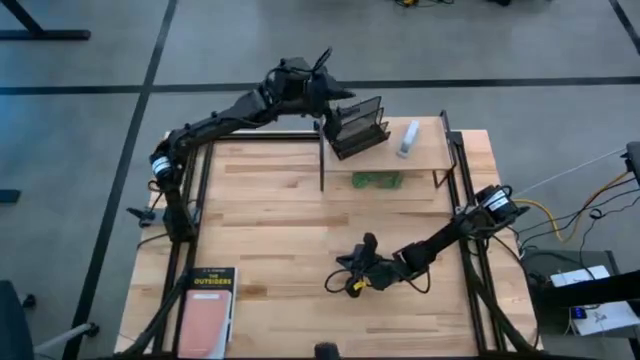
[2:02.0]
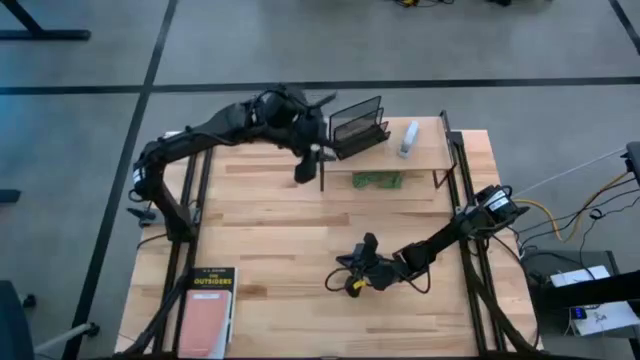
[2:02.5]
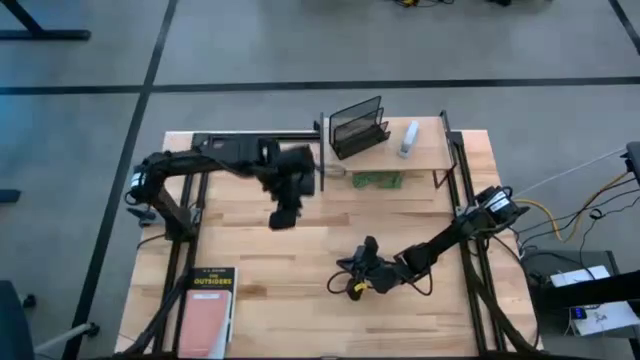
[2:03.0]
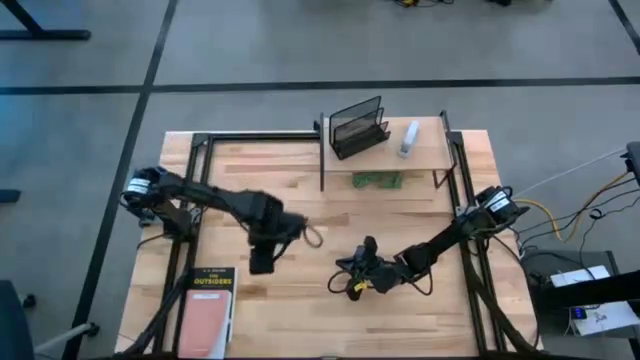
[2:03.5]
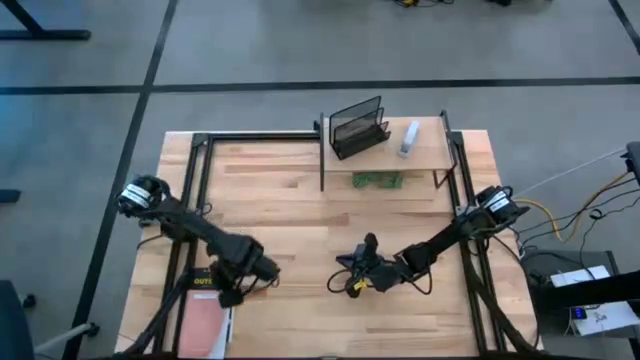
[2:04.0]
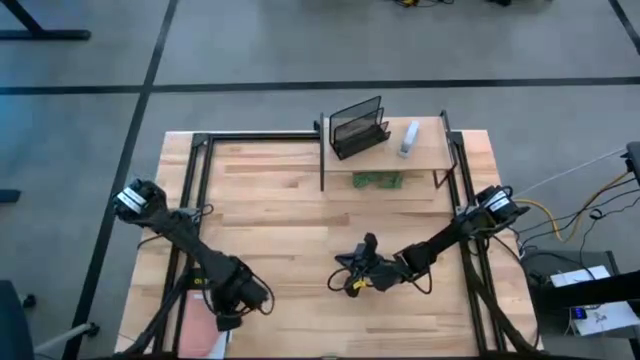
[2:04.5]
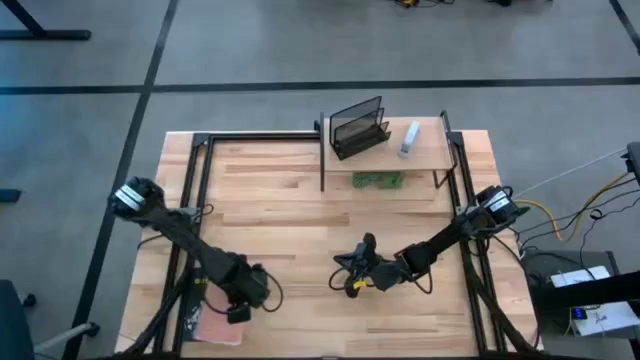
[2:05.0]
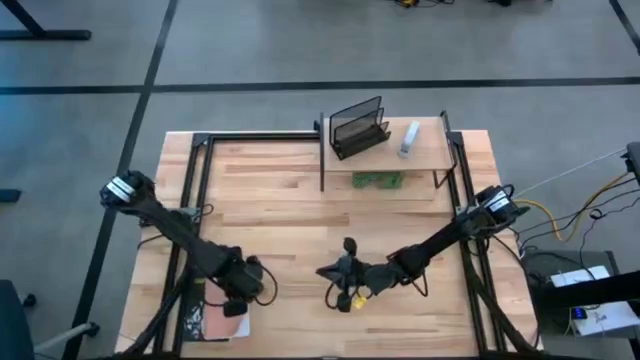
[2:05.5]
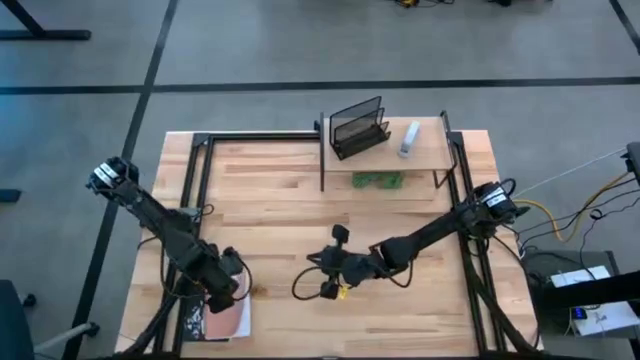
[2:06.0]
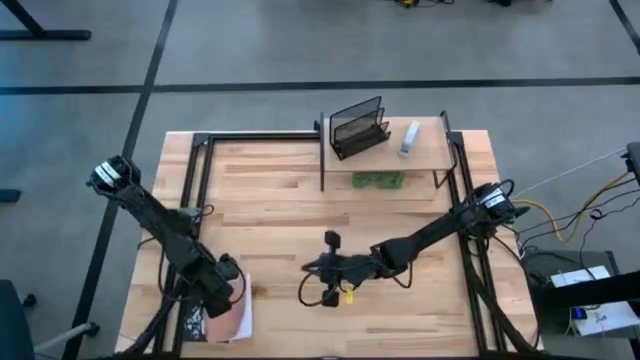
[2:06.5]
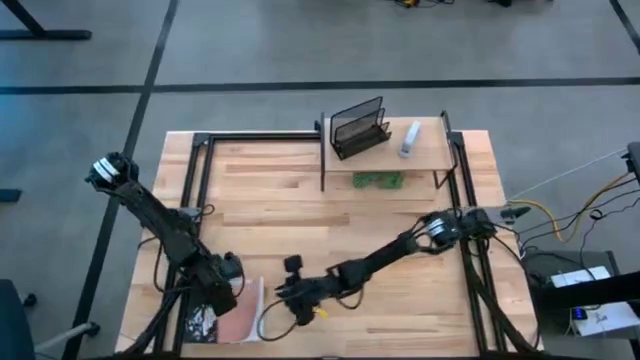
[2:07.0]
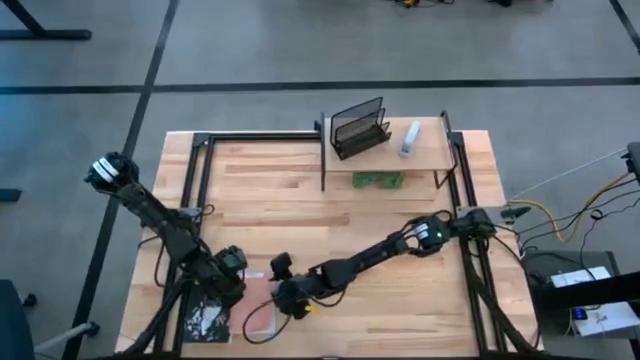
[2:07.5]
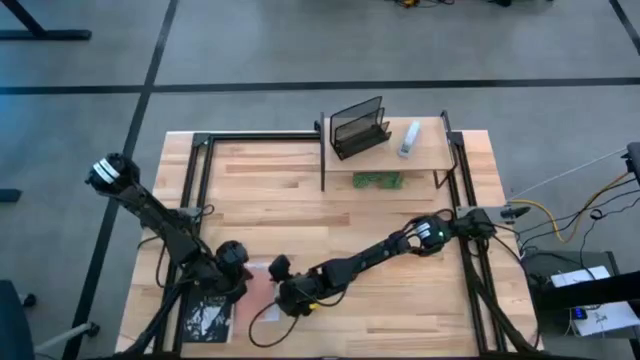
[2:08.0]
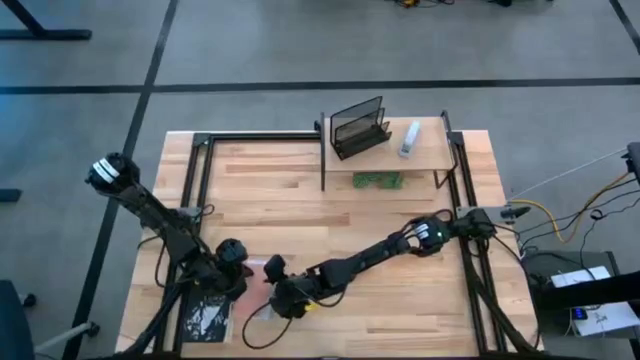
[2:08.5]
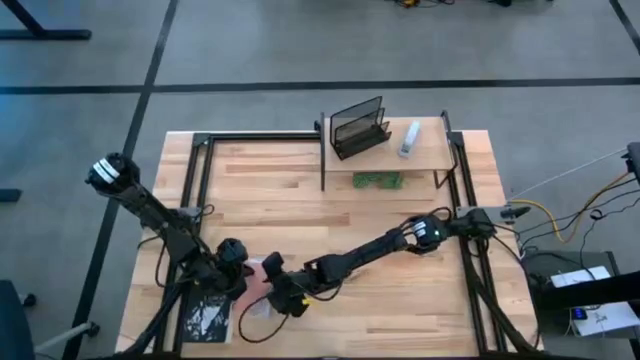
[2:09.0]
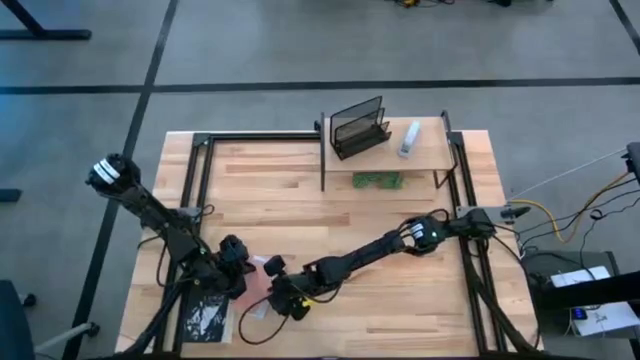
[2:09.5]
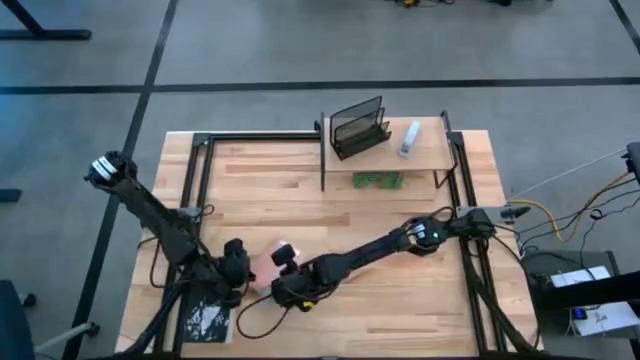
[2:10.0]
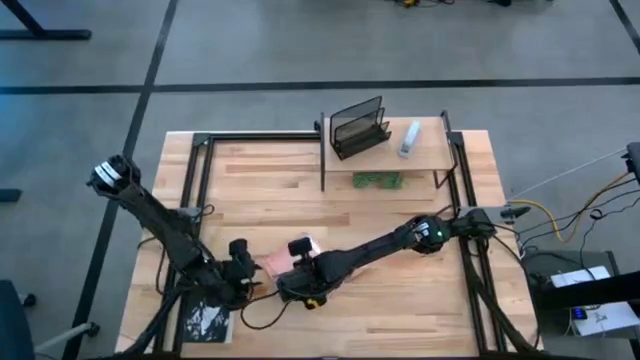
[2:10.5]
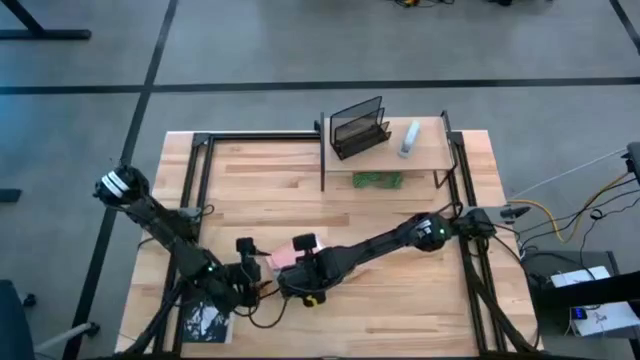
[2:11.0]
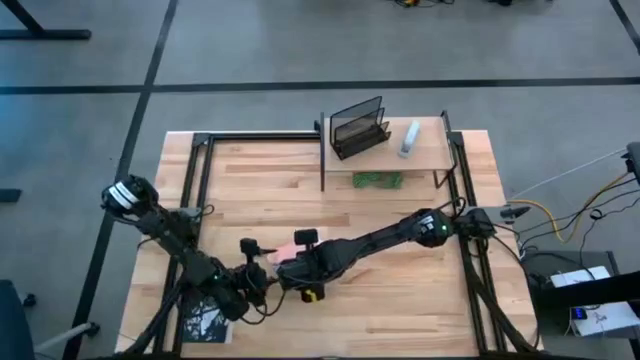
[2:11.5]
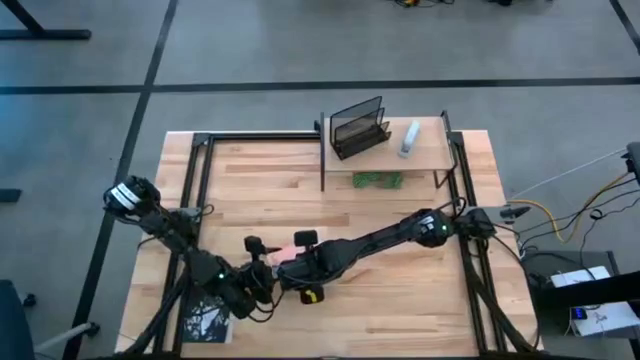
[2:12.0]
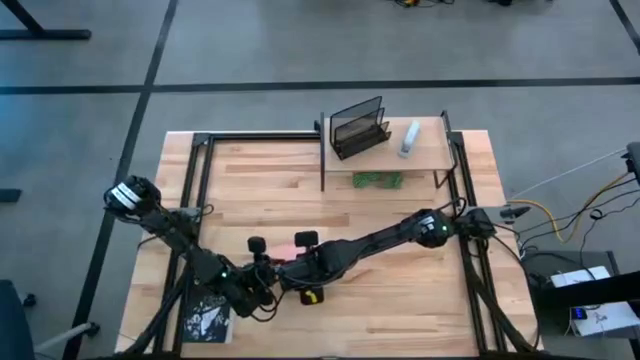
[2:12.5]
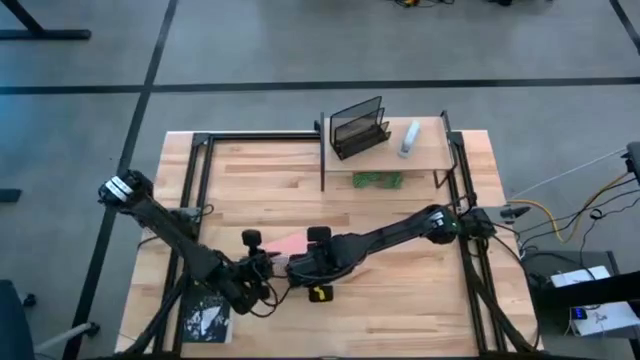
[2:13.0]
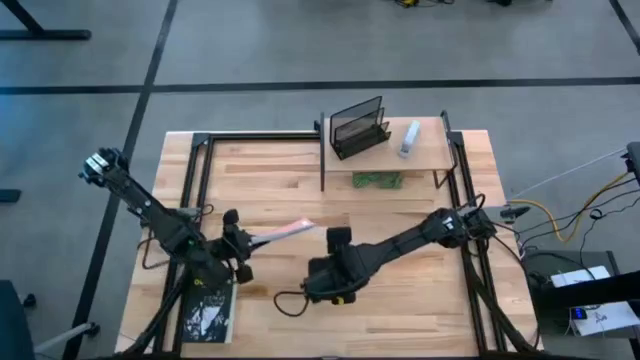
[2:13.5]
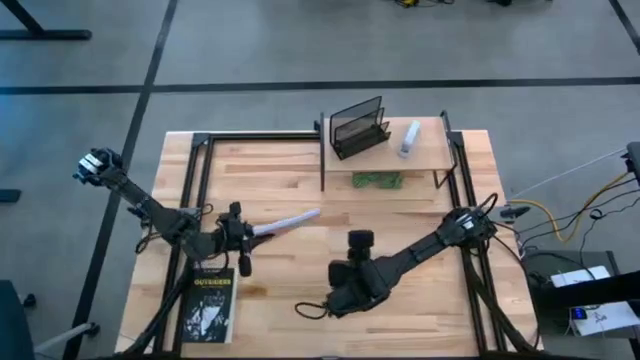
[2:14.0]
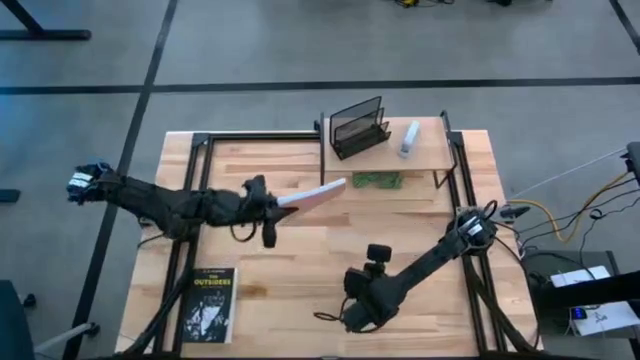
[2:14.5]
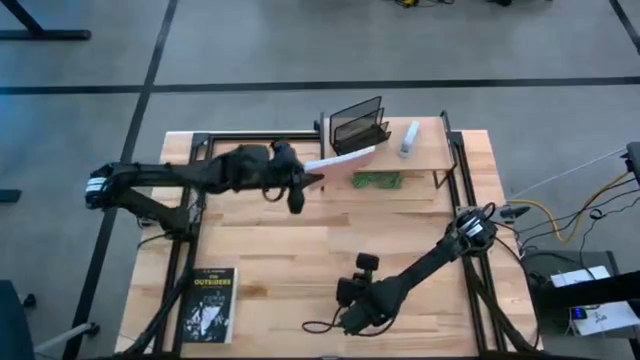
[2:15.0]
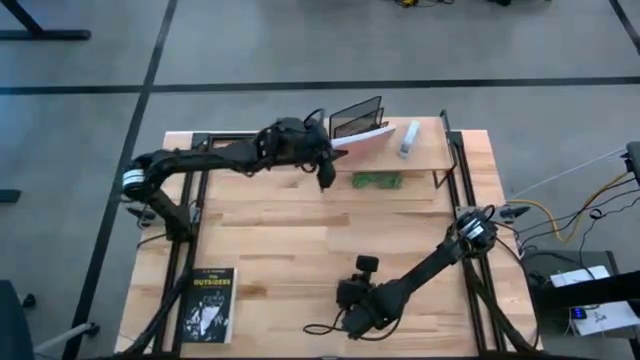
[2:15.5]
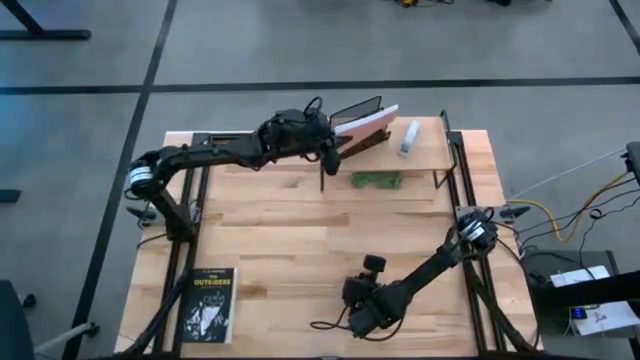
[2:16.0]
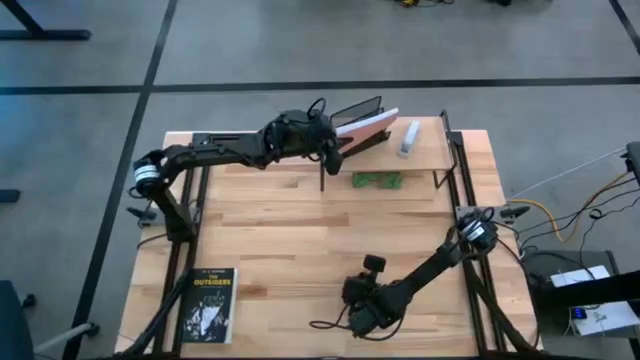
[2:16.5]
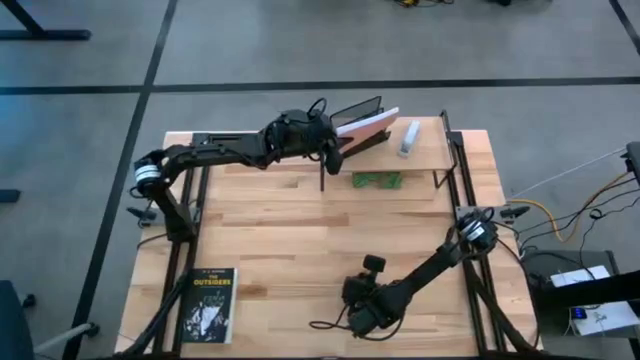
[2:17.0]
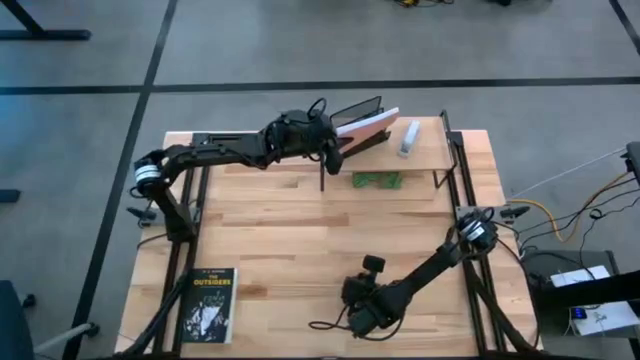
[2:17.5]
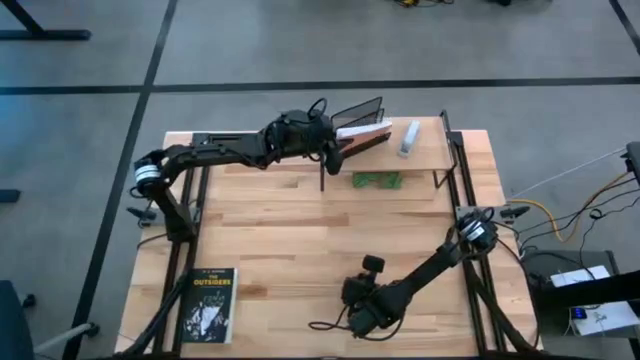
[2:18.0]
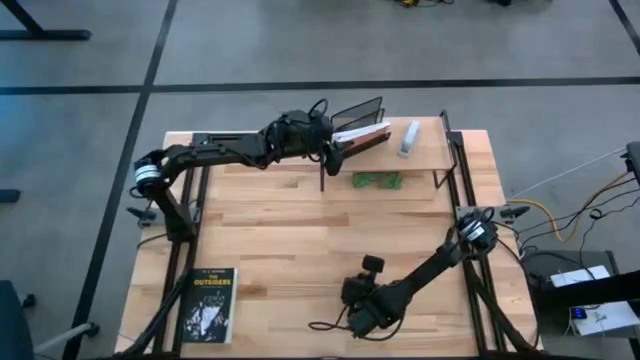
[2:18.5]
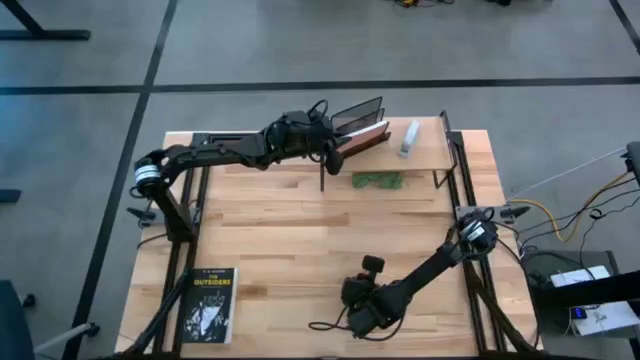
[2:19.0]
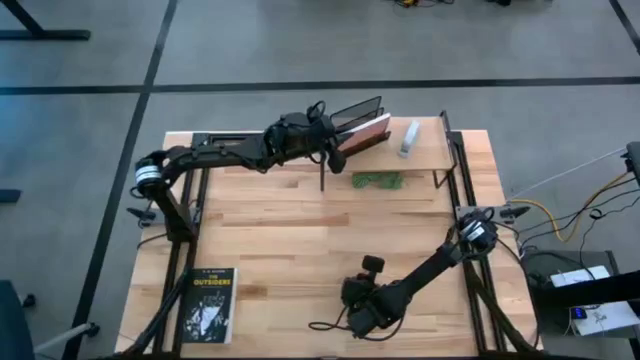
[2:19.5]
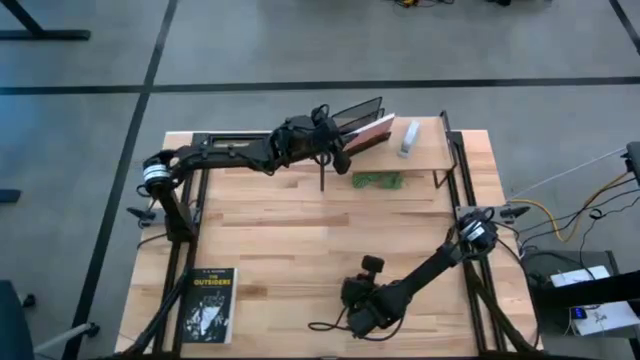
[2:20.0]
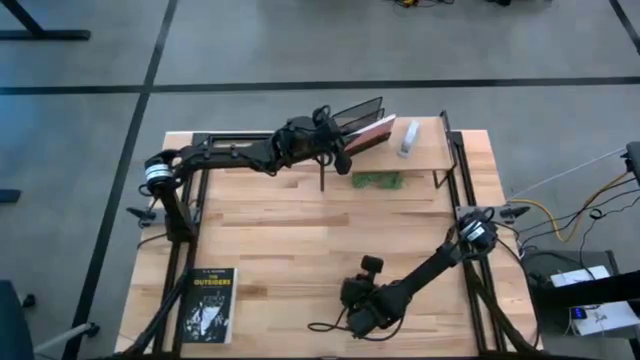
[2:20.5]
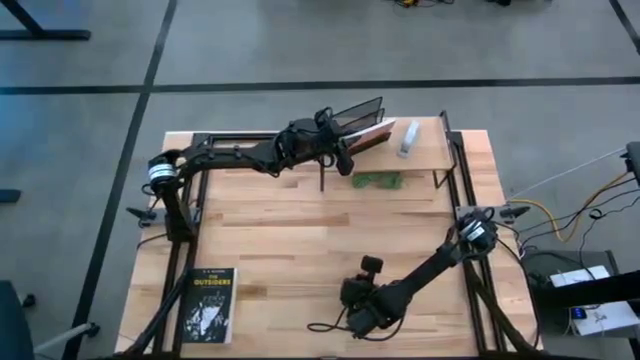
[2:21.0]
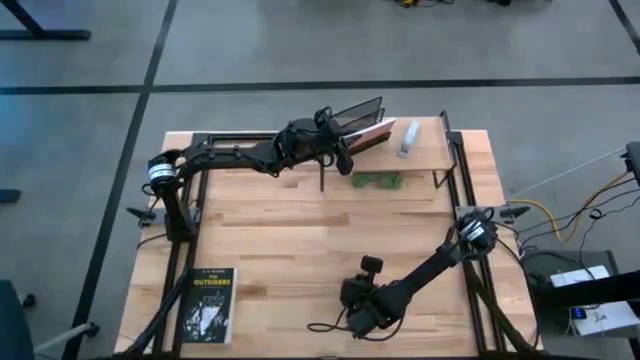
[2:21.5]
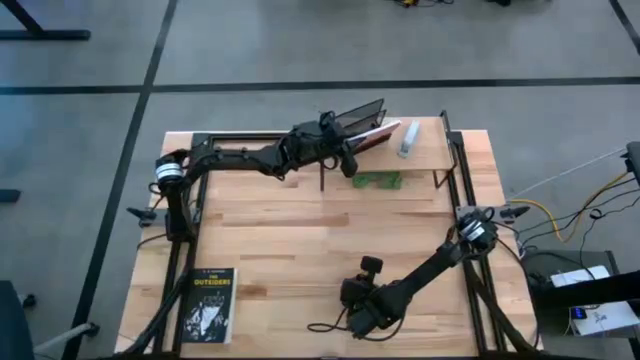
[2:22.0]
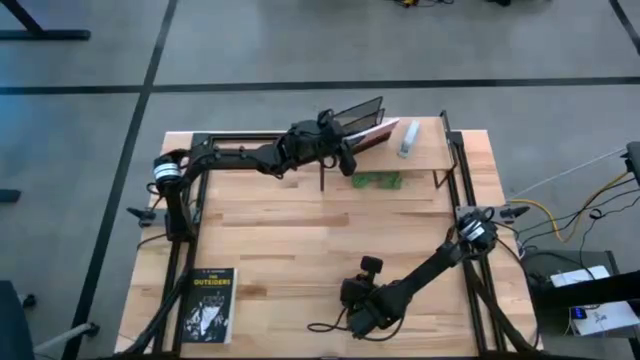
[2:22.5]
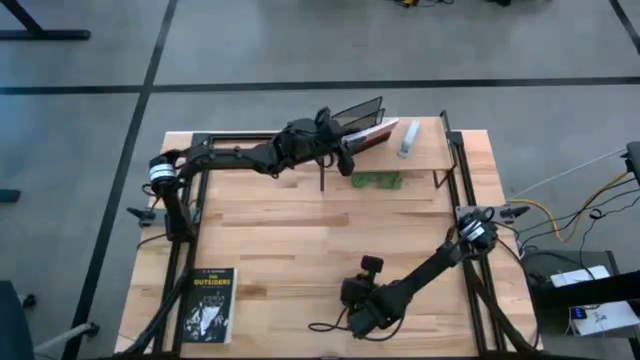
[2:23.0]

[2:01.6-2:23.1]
Task: Stock shelves
Put the pink notebook into the black desk organizer on the shelf
